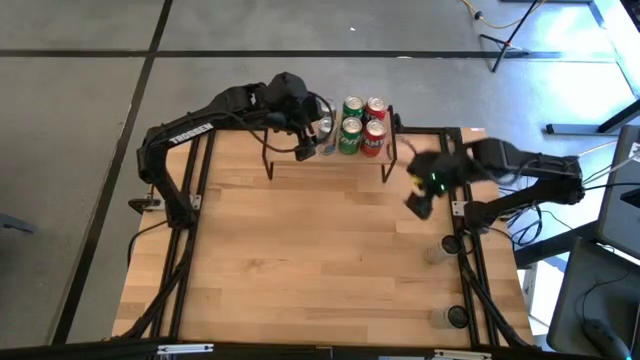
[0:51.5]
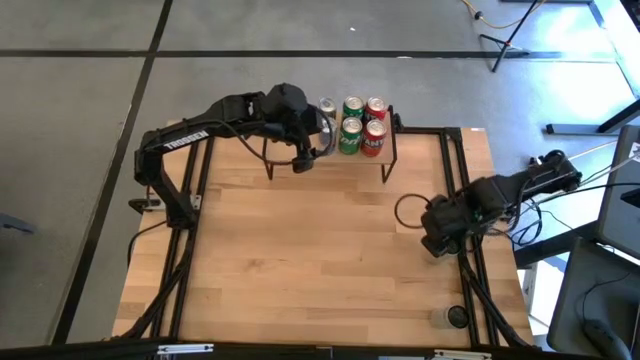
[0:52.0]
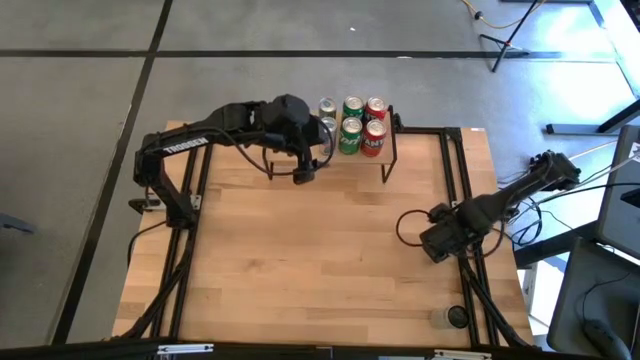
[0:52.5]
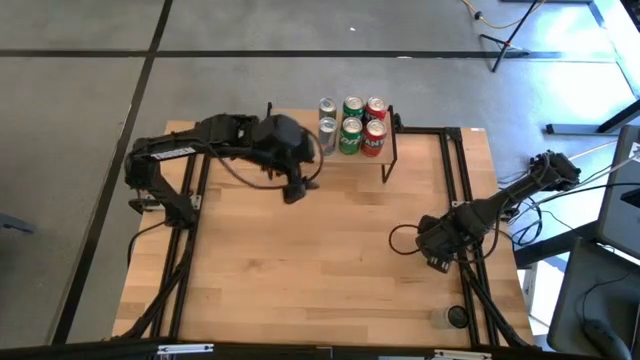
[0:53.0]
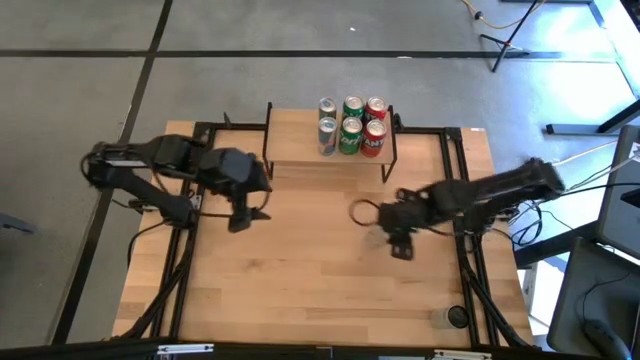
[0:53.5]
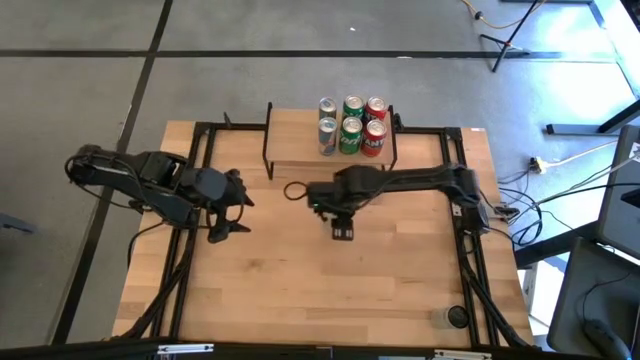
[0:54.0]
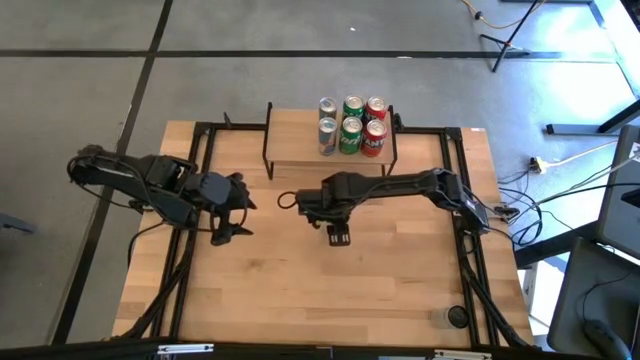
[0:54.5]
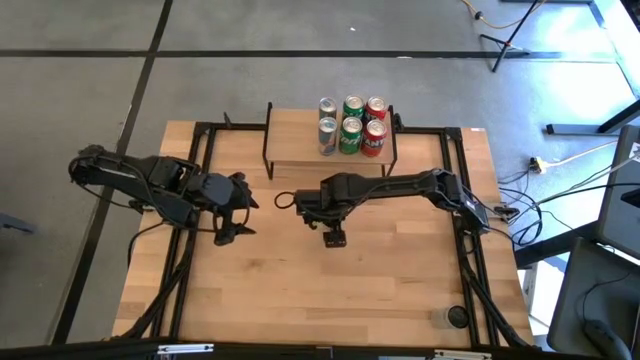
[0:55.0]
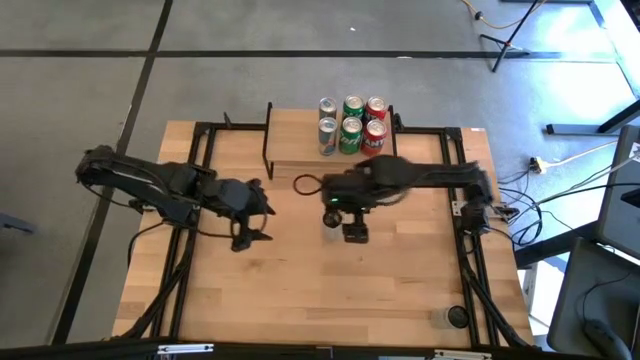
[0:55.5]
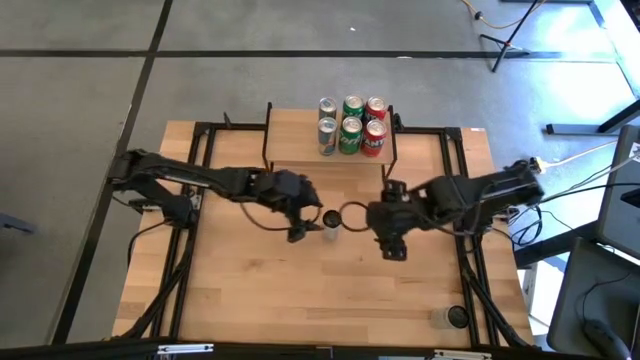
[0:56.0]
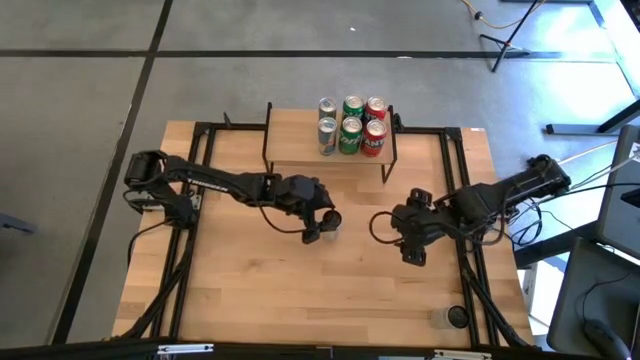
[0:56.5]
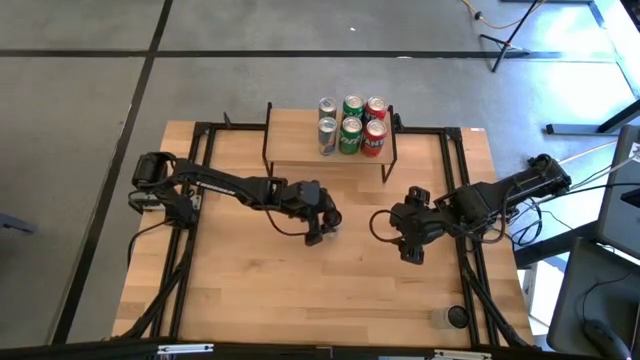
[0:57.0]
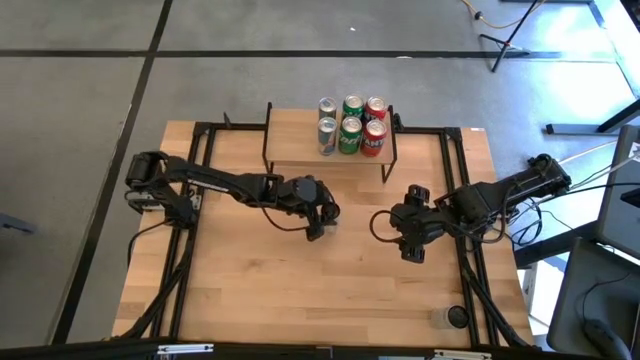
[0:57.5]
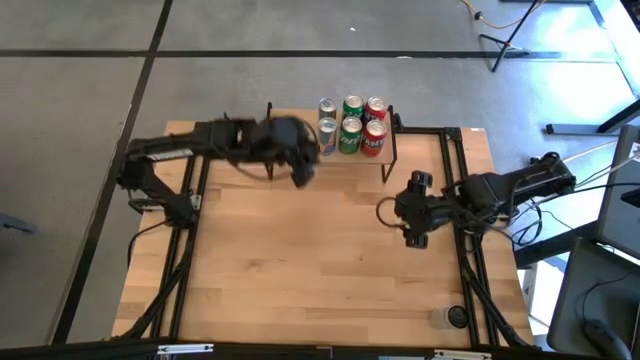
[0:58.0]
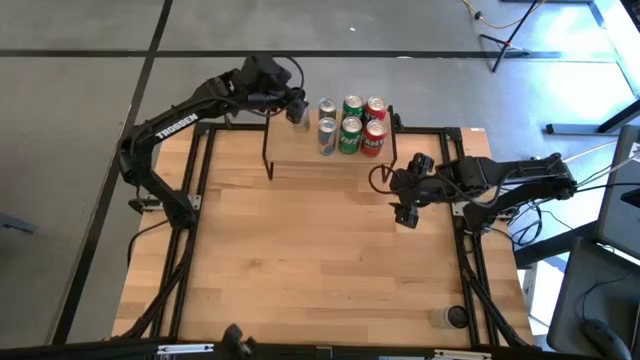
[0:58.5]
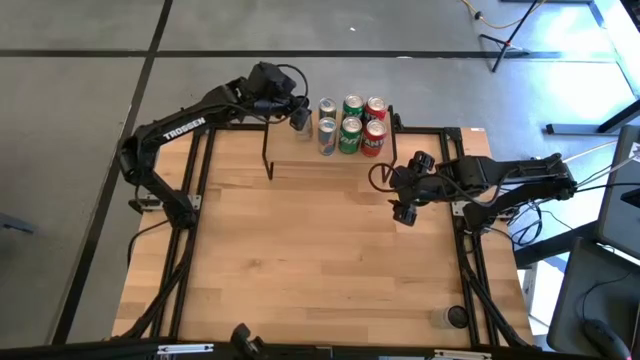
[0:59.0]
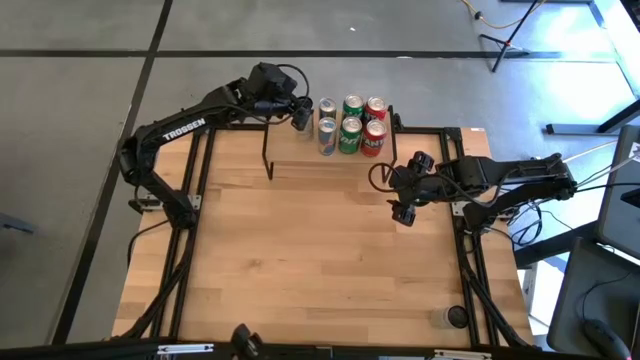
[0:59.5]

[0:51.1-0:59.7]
Task: Place canned beverage on shelf
Put the top white soda can on the shelf

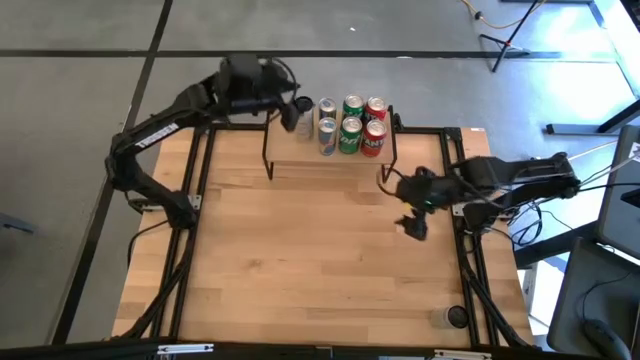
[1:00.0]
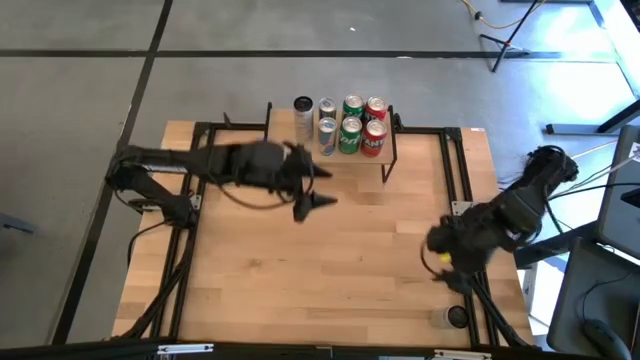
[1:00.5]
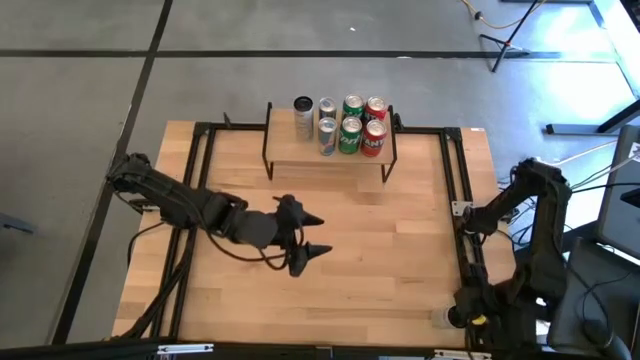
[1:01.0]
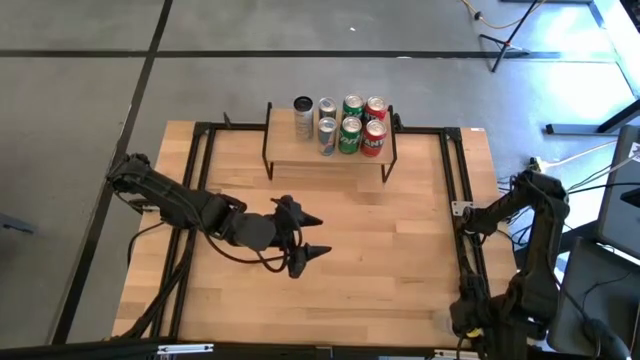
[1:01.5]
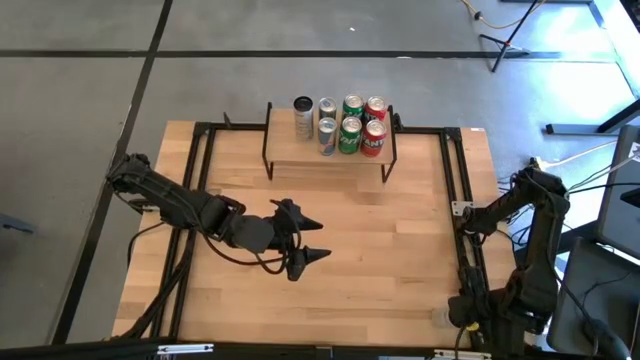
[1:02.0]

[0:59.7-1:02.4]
Put the white soda can on the shelf aligned with the other white soda can

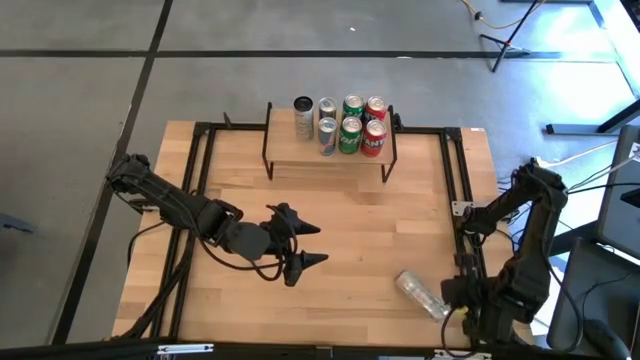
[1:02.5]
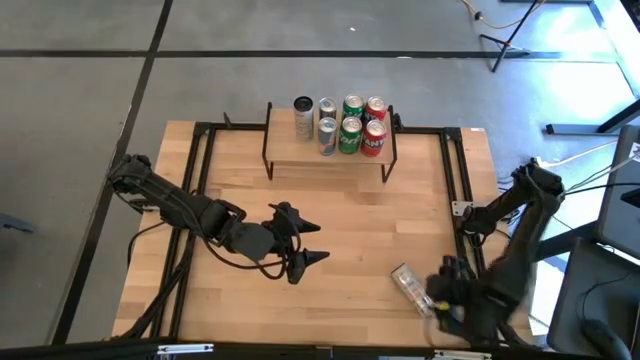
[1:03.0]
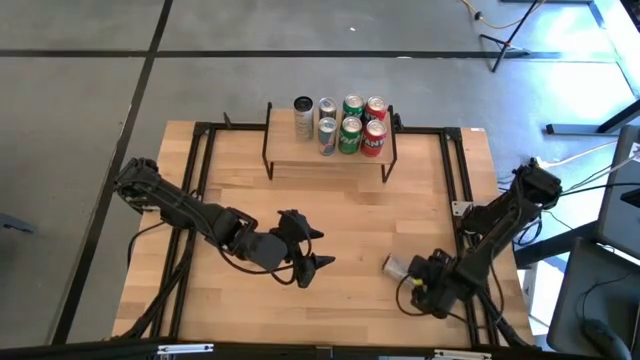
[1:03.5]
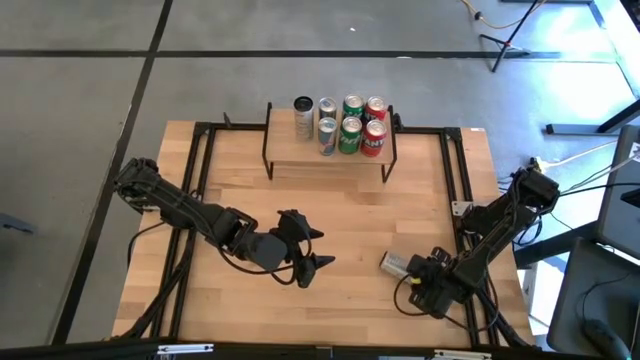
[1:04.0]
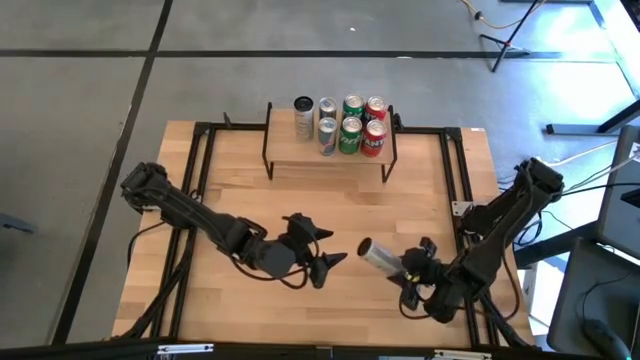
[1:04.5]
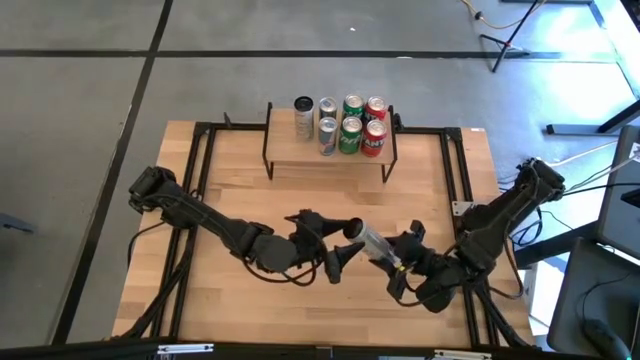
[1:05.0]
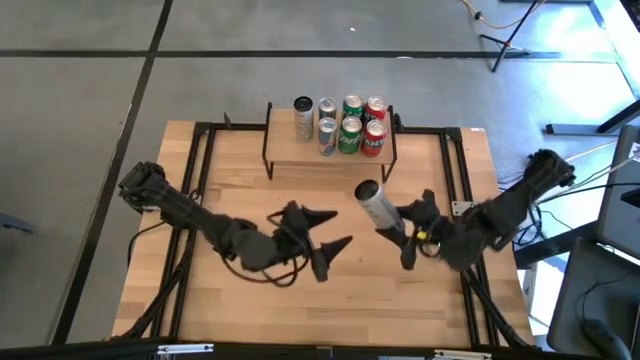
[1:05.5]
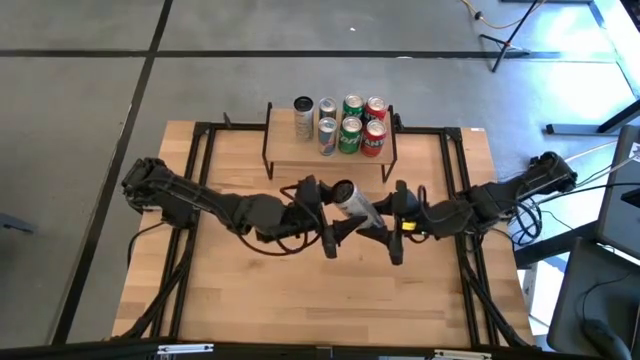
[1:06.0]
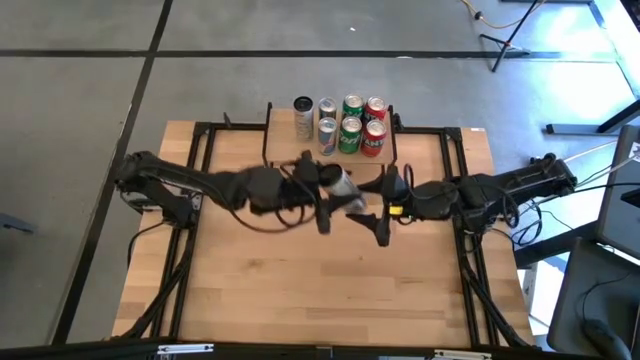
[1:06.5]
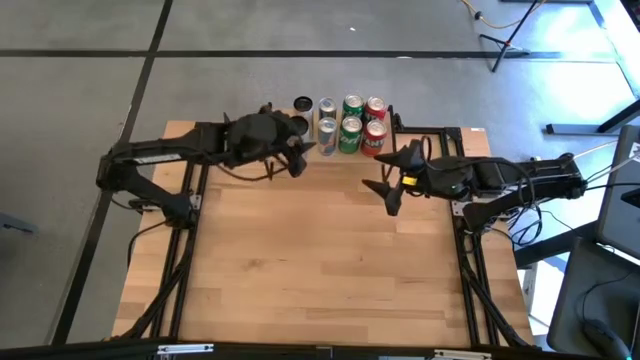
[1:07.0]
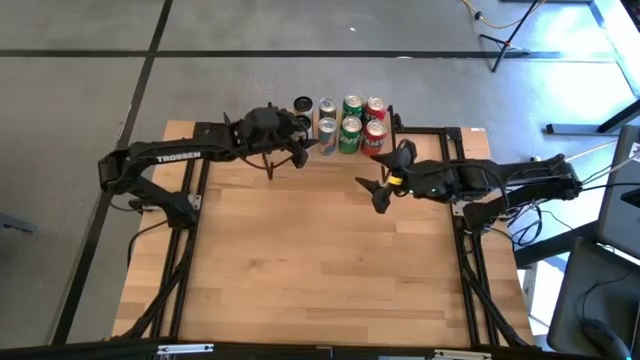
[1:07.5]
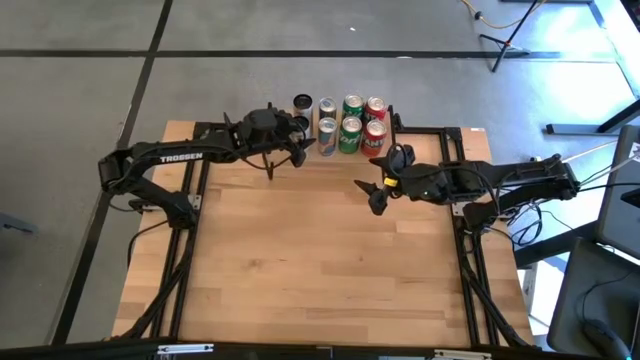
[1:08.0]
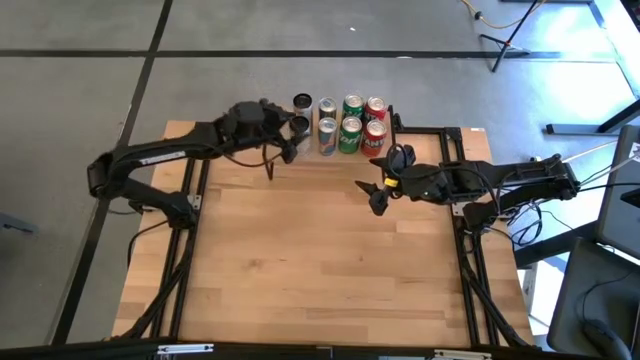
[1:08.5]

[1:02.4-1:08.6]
Put the white soda can on the shelf aligned with the other white soda can

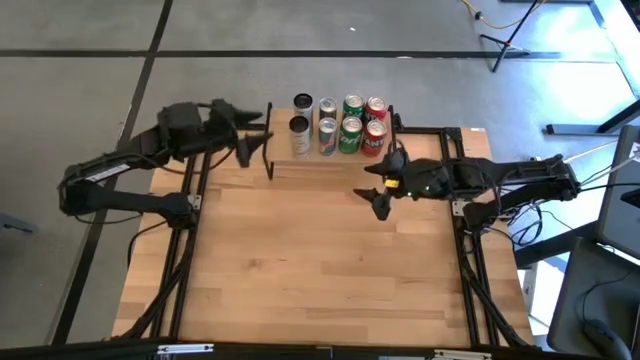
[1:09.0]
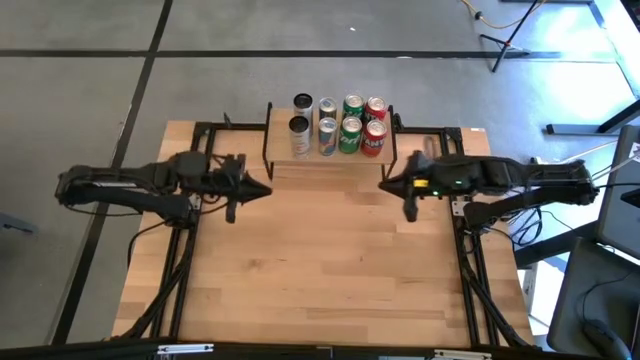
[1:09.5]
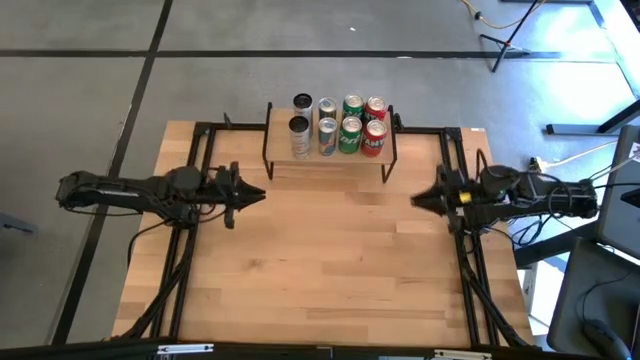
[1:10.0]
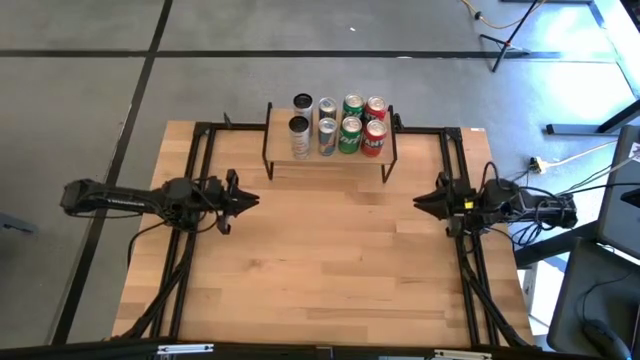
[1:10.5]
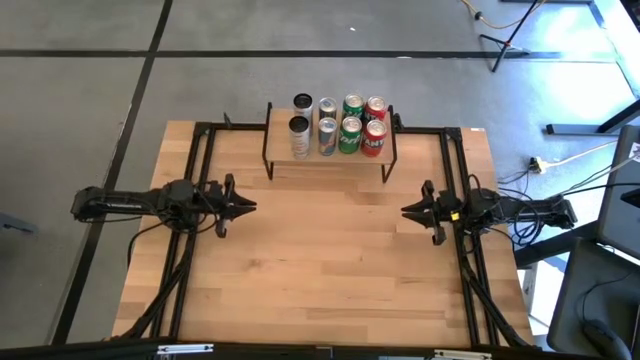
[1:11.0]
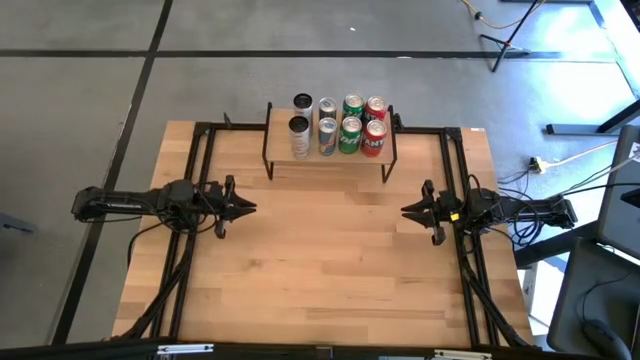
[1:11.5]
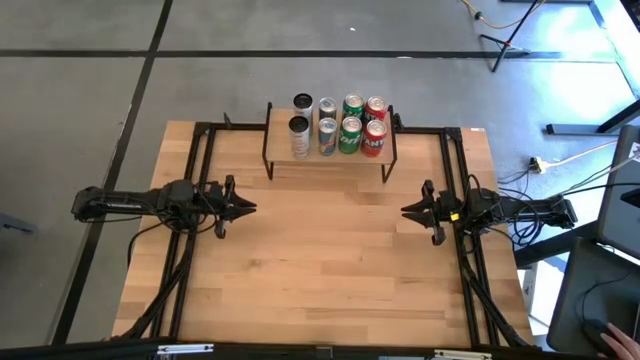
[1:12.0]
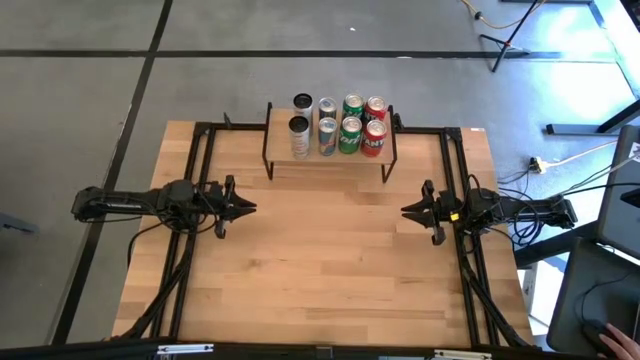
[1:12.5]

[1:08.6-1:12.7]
Return to Home Position
